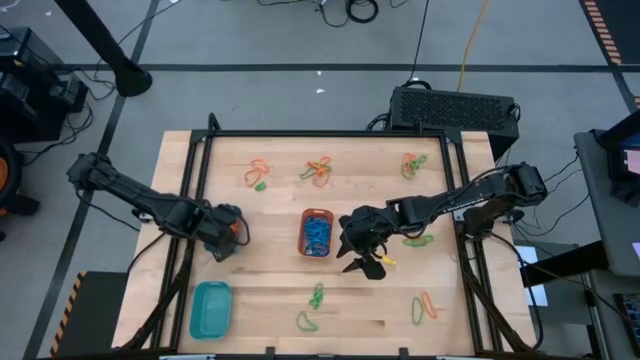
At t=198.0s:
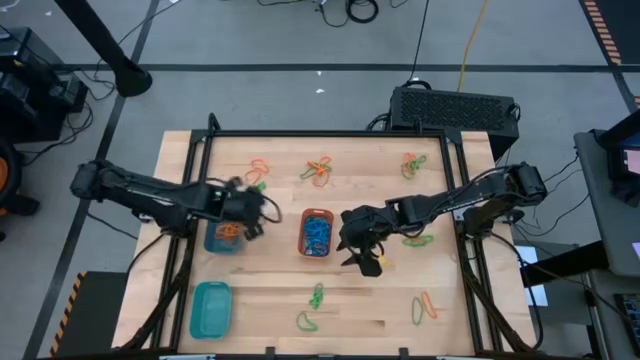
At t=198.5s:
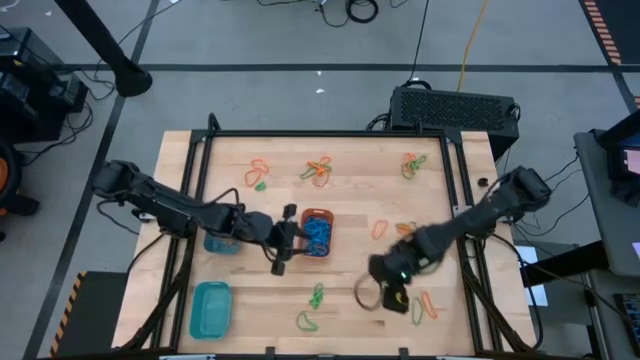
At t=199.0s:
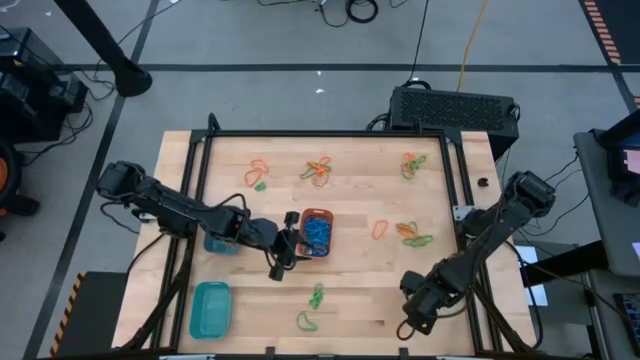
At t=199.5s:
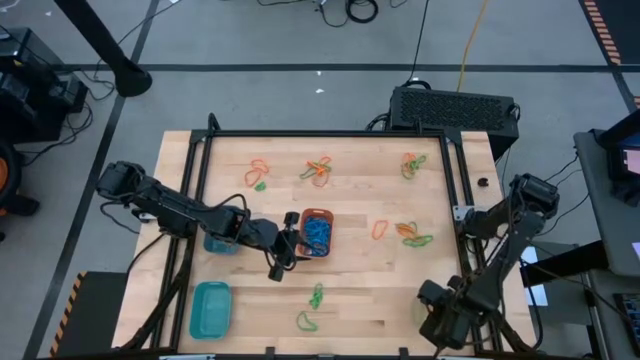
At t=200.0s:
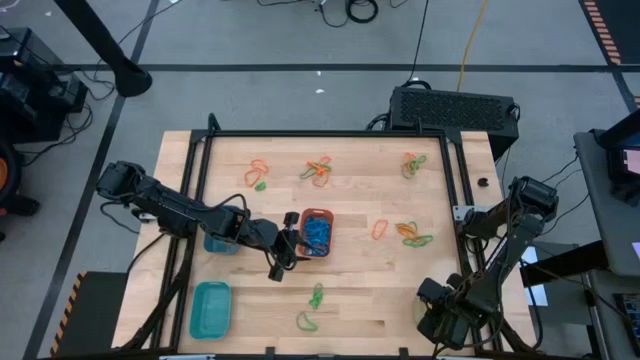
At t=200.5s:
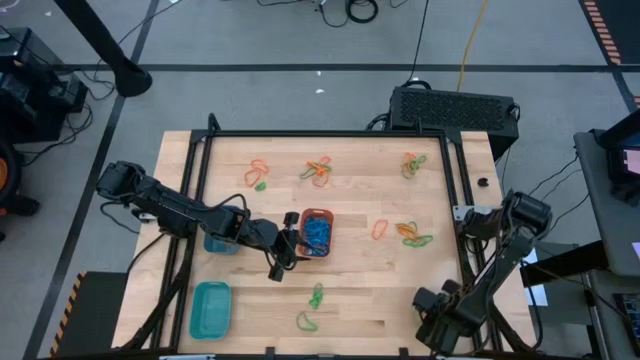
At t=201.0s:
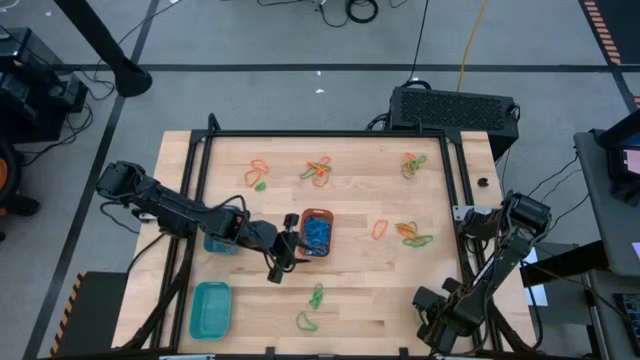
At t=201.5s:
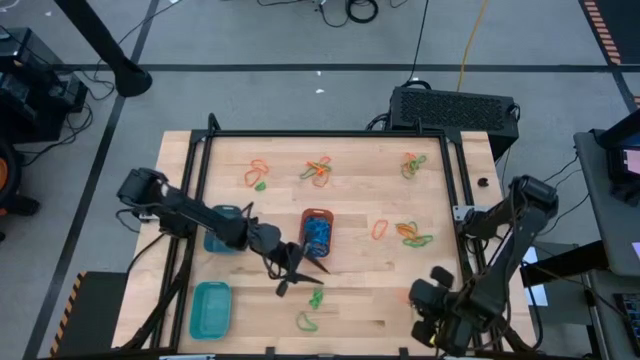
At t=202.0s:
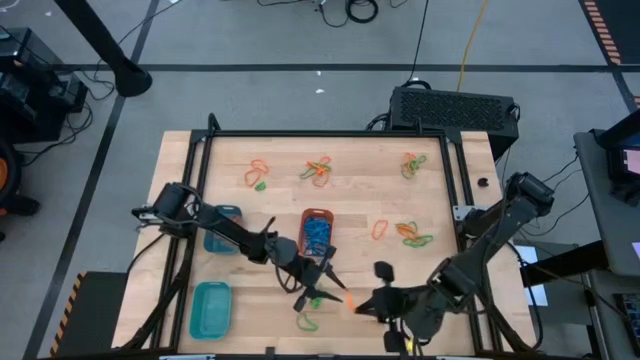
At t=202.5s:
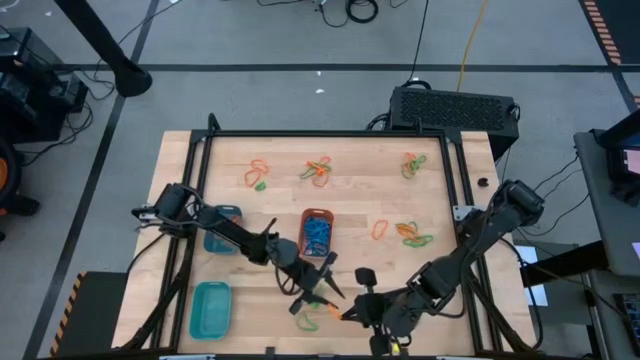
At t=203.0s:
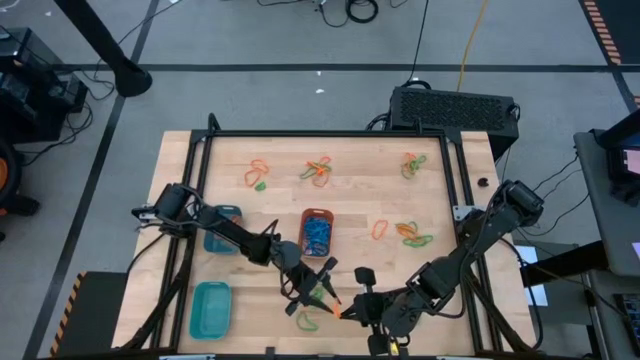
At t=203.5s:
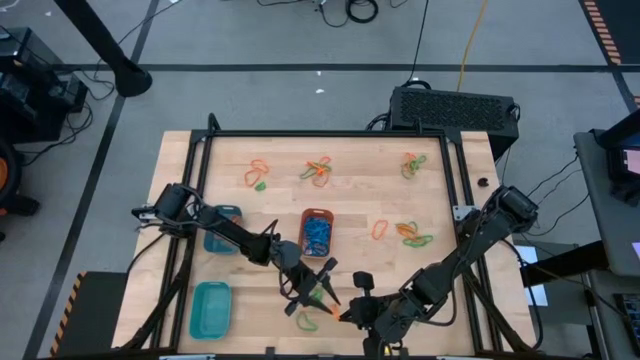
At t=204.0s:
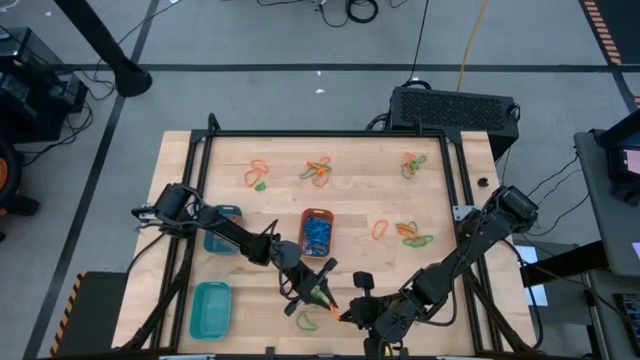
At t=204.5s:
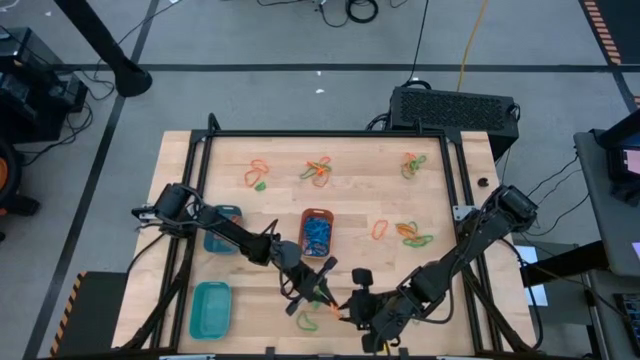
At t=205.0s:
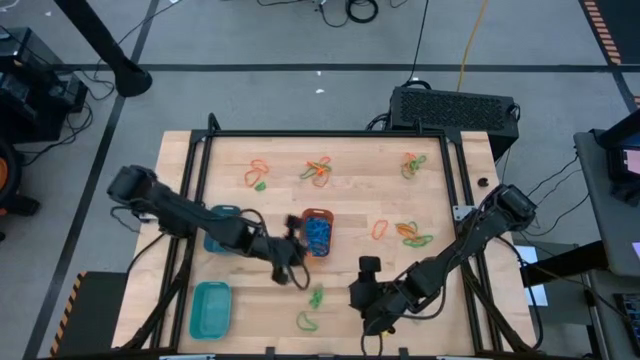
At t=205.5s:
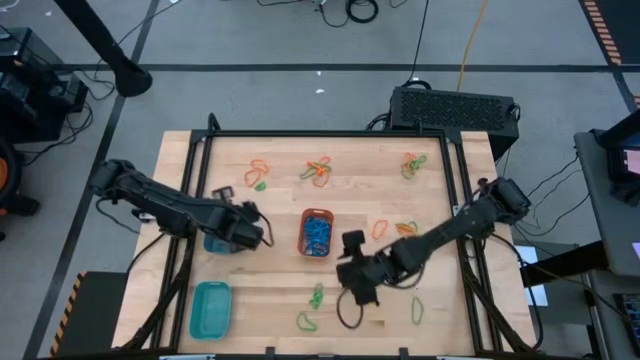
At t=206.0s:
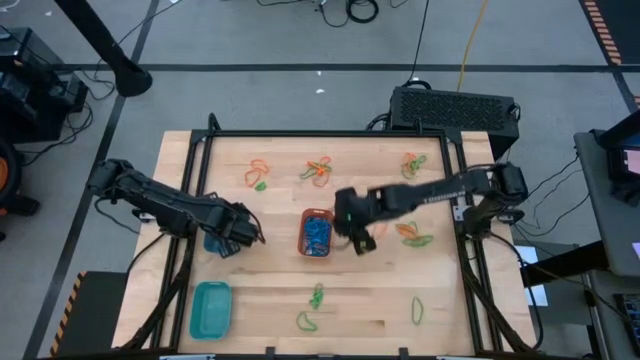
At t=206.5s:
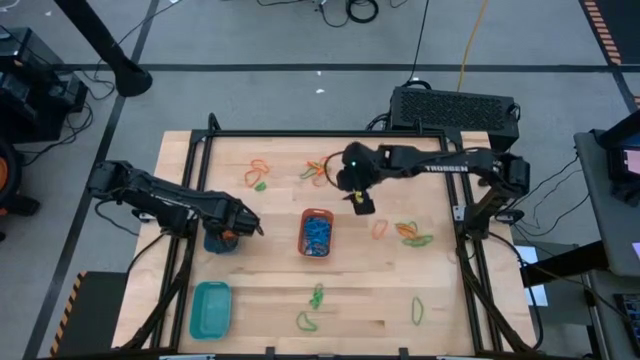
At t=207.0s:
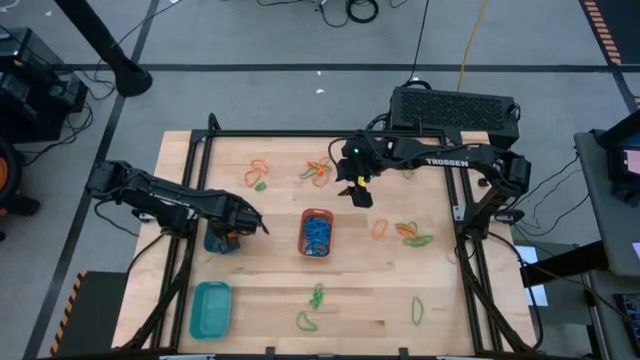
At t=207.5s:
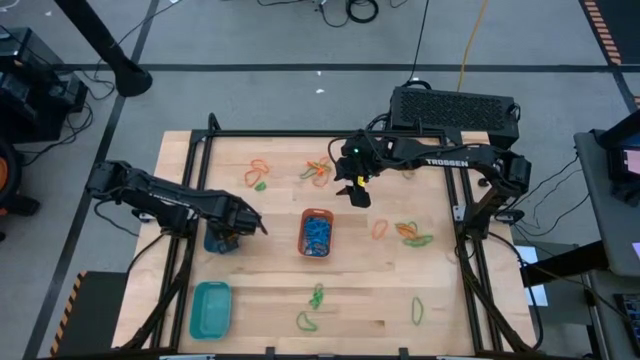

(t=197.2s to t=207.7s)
Task: Sort rubber bands into baskets
Put the orange rubber band into the blue bin

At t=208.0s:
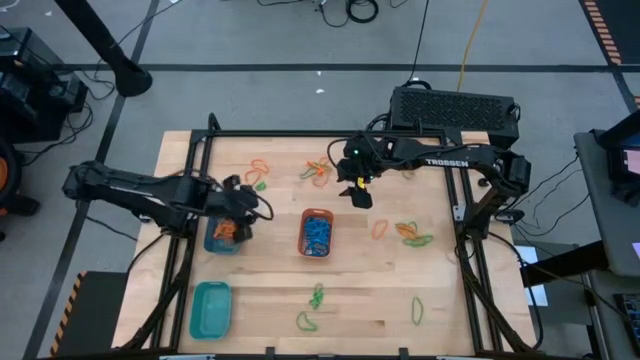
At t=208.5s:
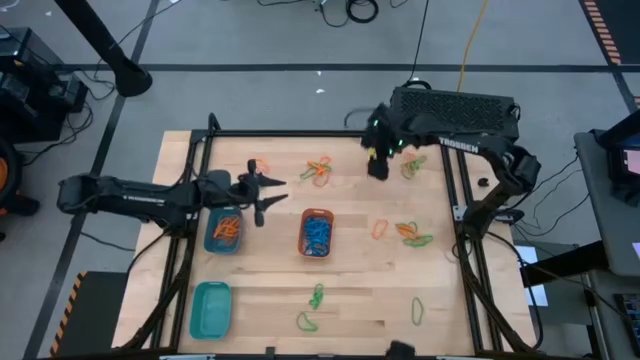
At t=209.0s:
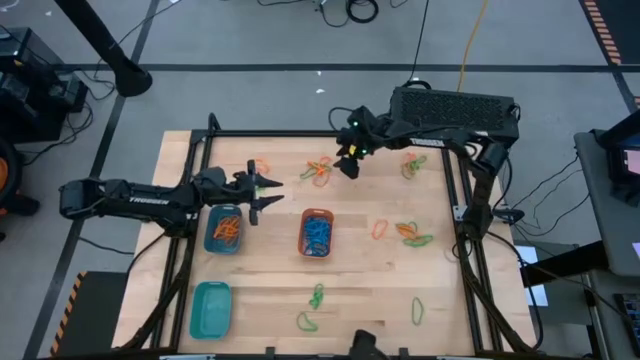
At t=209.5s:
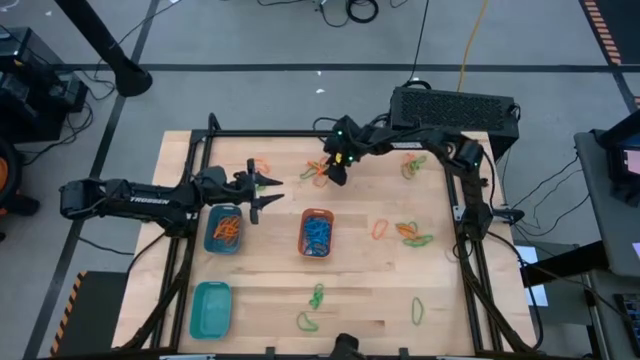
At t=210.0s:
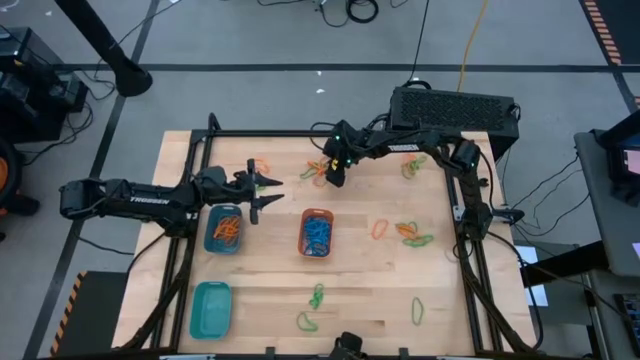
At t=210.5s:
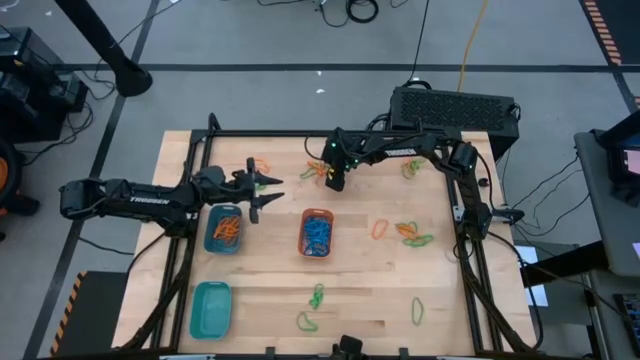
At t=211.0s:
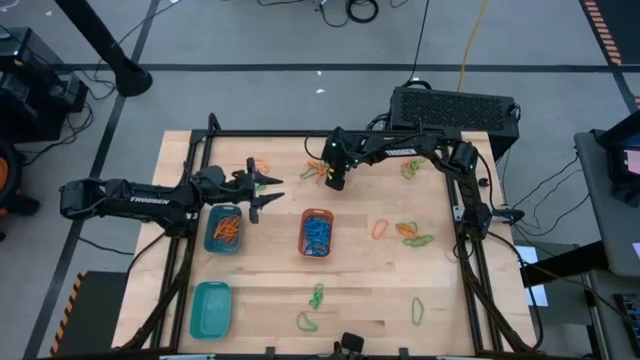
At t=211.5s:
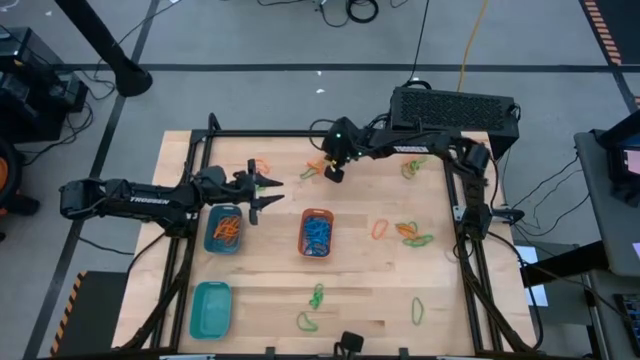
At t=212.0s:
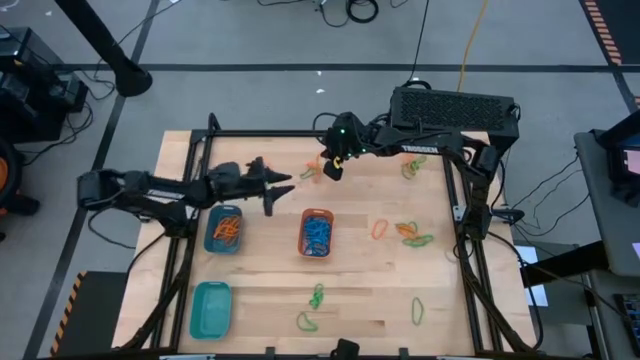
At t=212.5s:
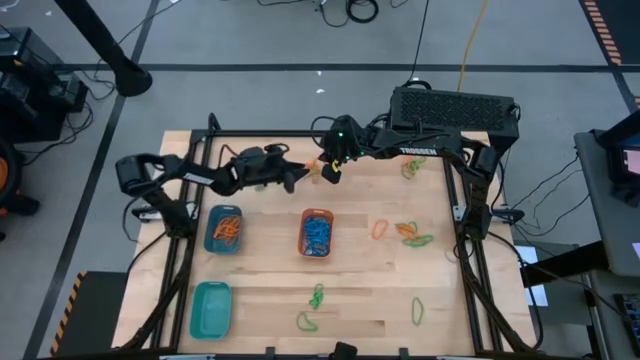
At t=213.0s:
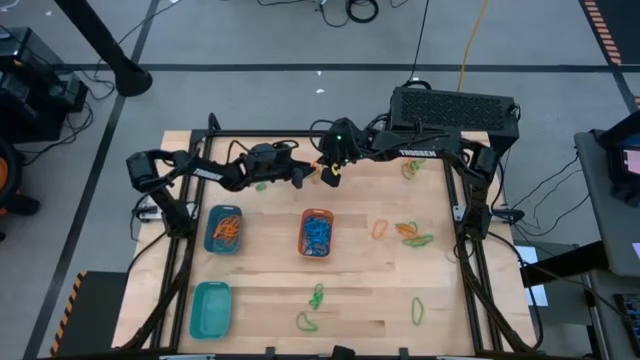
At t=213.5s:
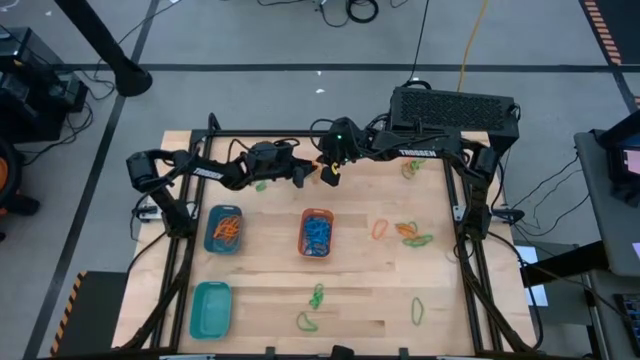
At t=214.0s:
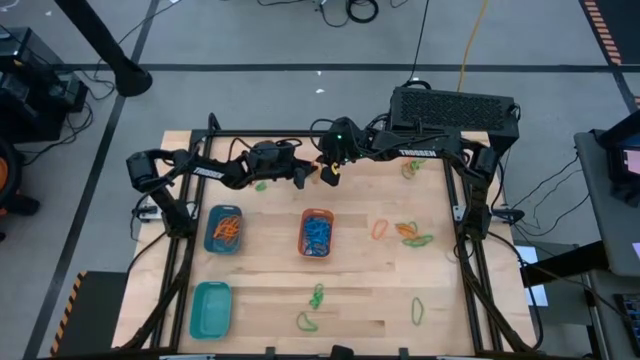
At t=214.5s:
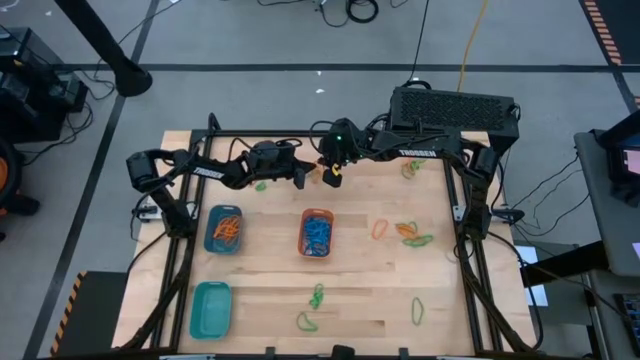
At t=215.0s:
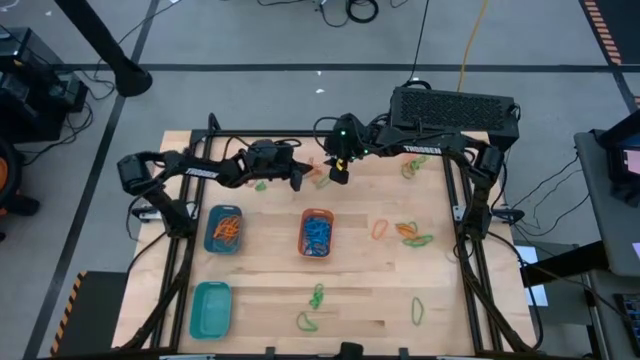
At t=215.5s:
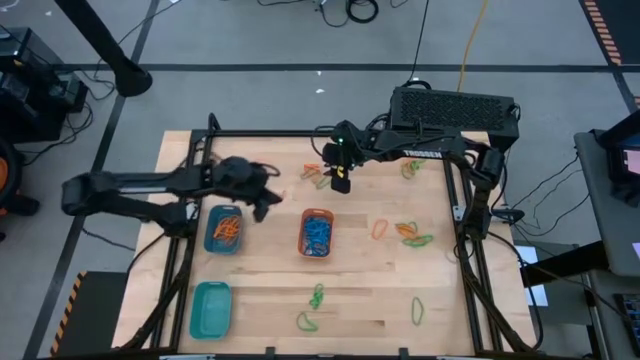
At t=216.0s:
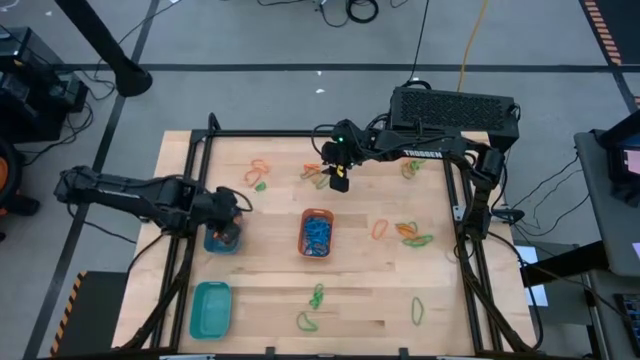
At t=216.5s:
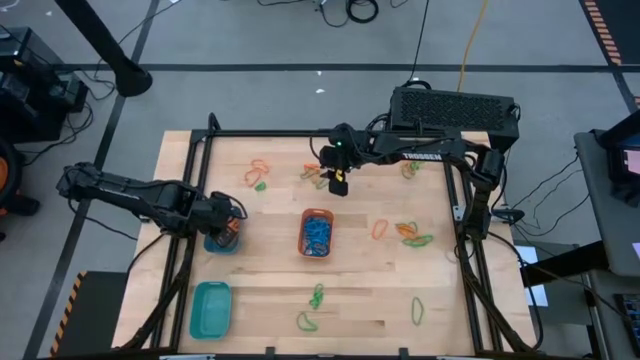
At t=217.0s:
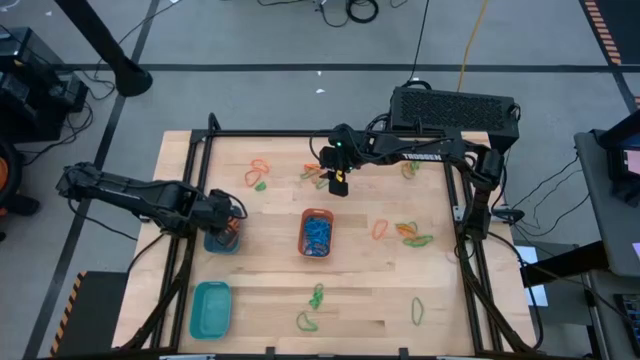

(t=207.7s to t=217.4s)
Put the orange rubber band into the blue bin
